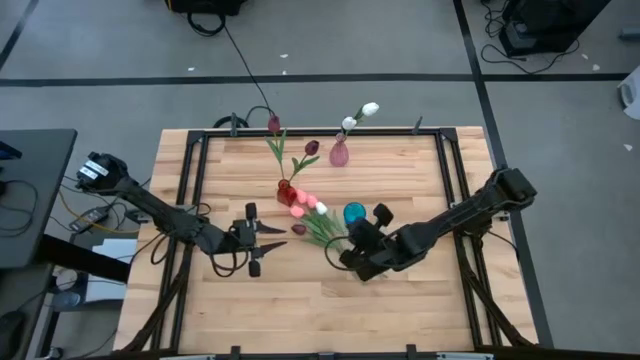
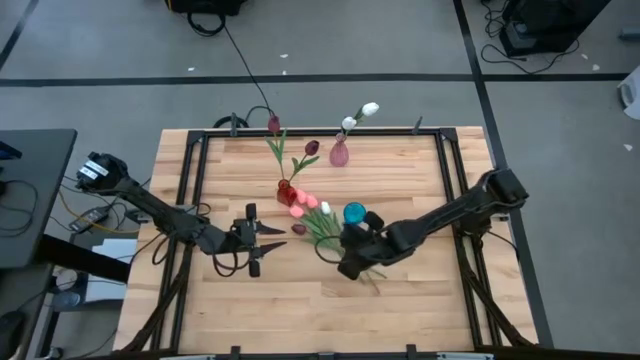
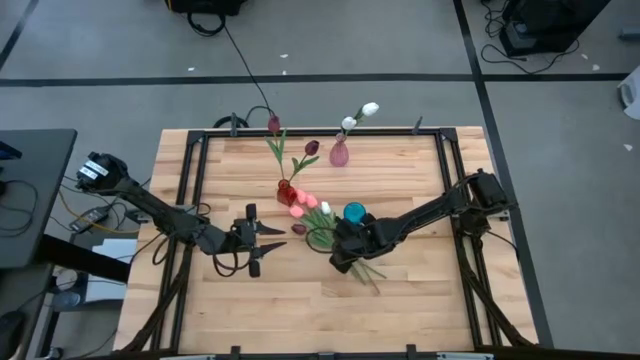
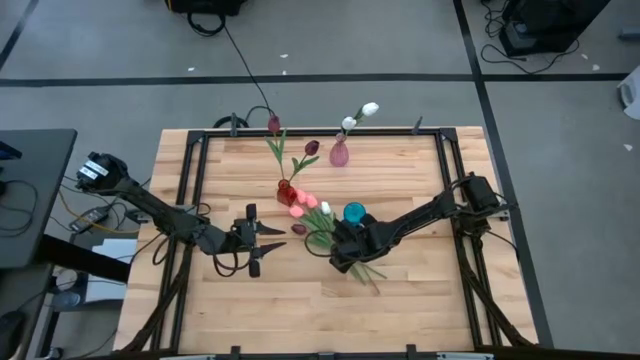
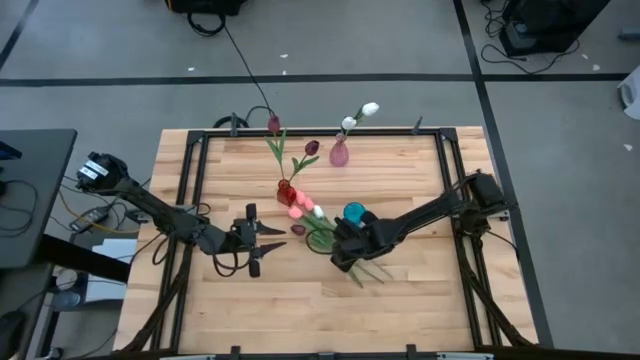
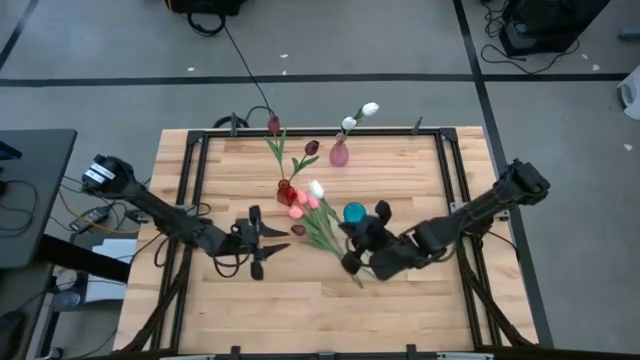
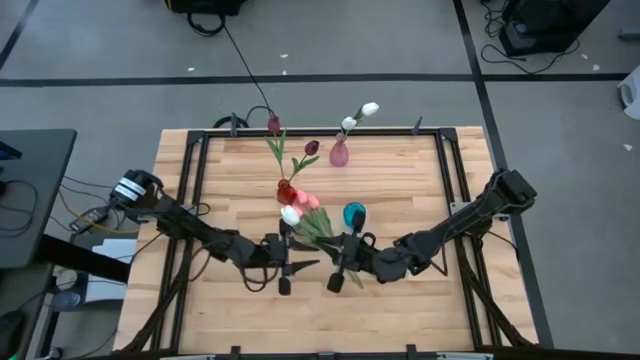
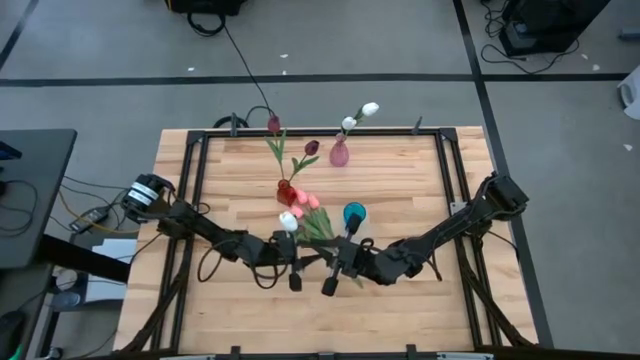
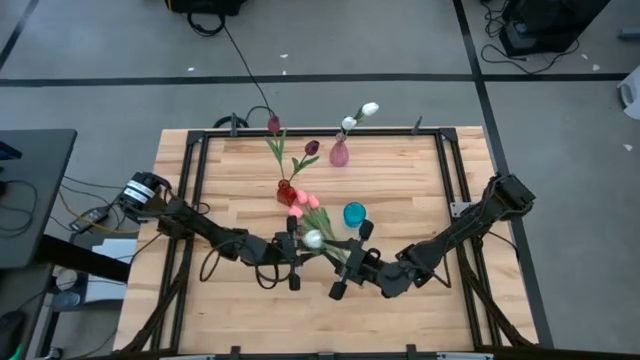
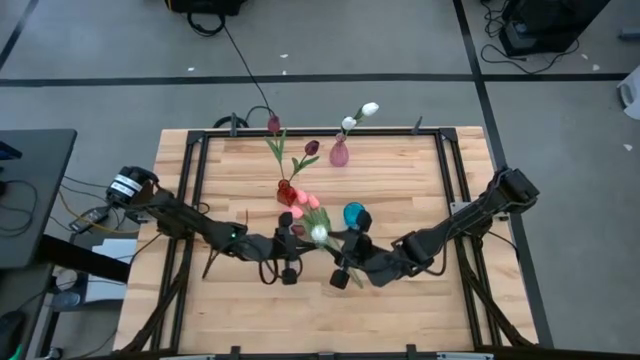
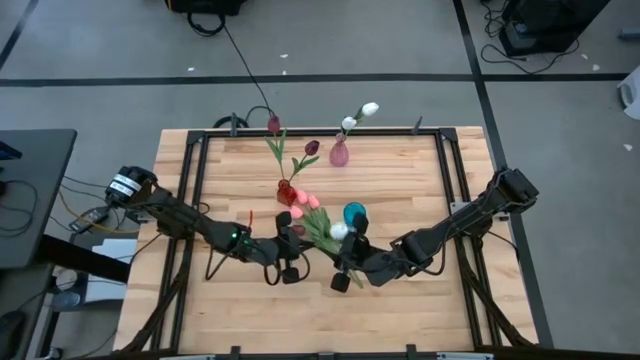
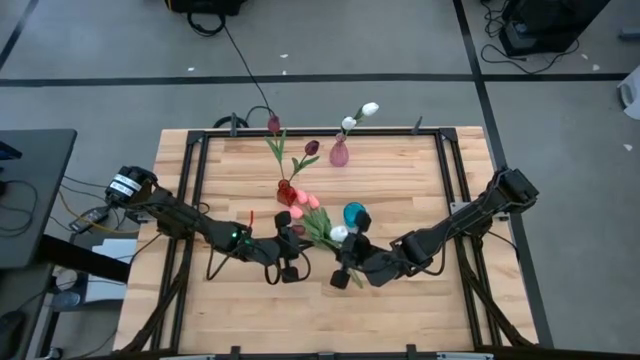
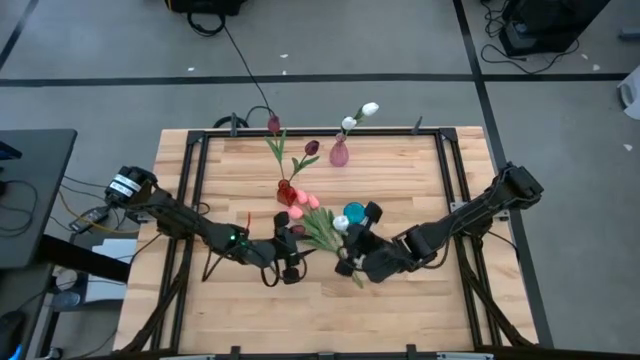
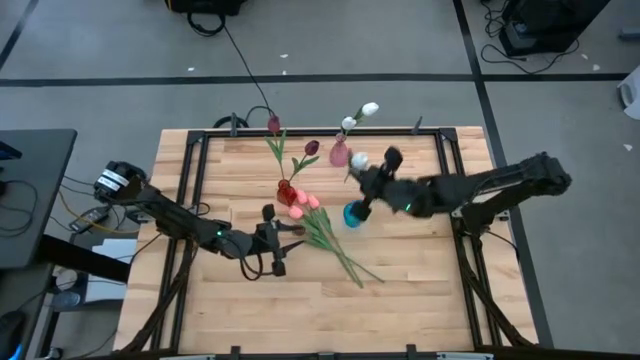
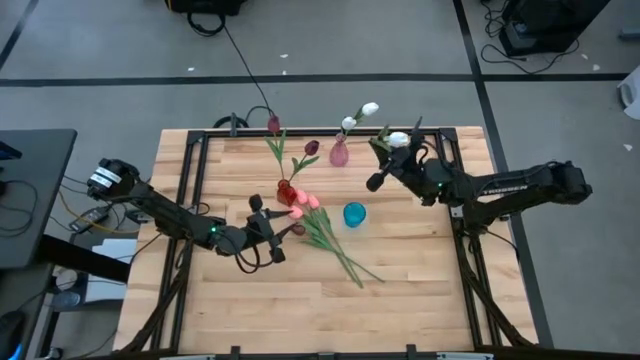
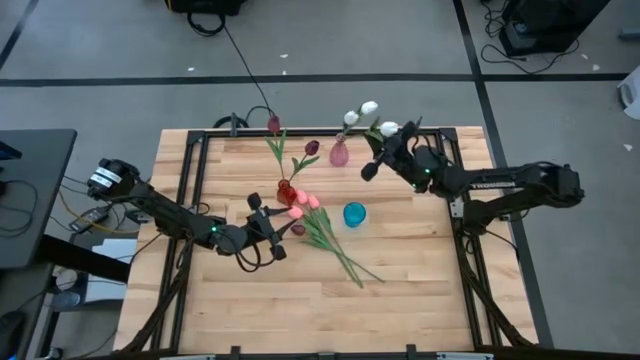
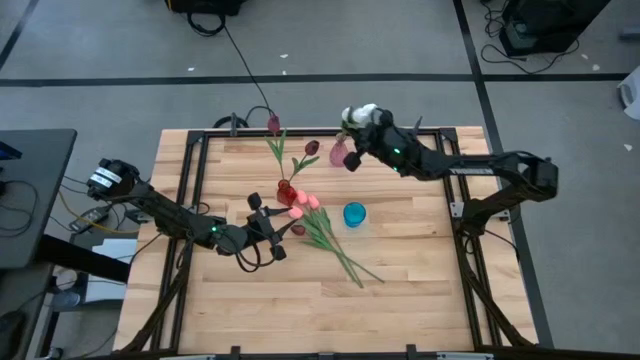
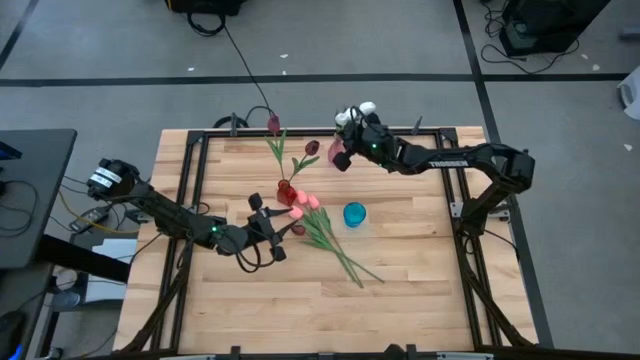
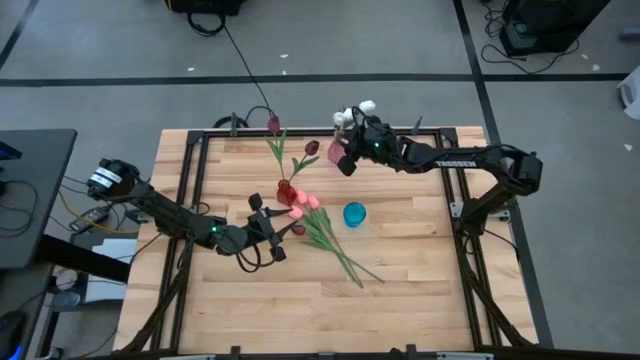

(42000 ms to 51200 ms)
Task: Sort flowers into vase by color
Put the white tulip into the pink vase

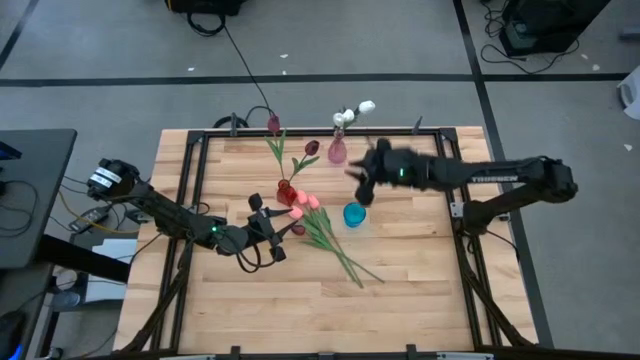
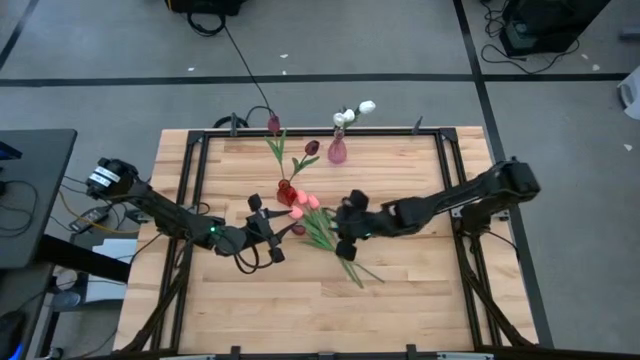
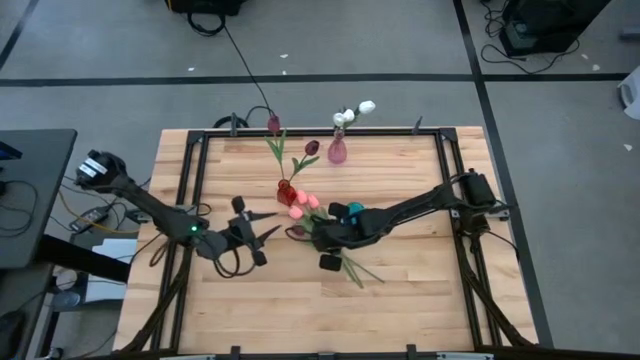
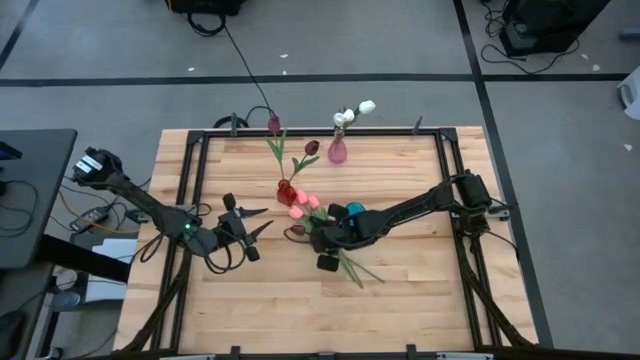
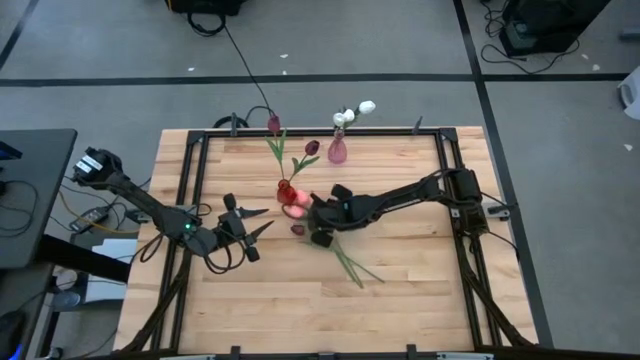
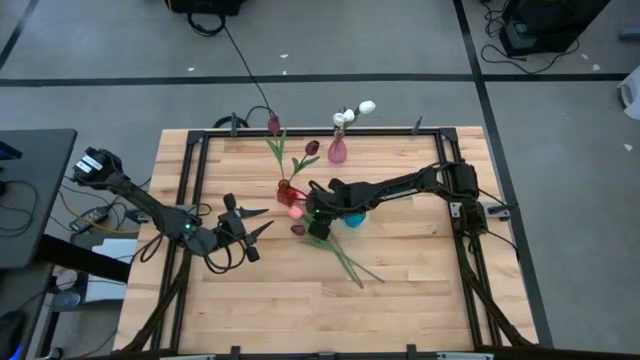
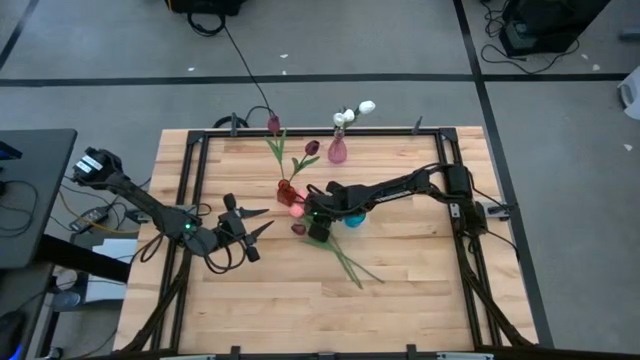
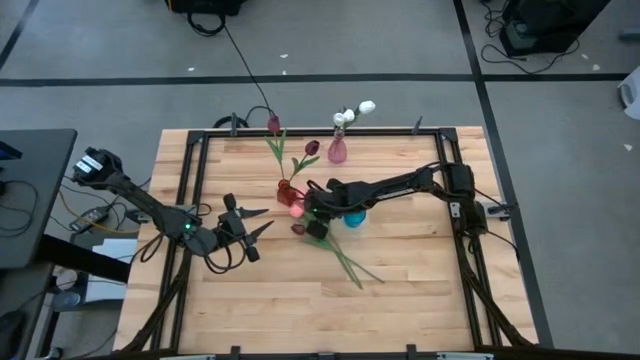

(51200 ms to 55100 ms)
Put the pink tulip into the blue vase

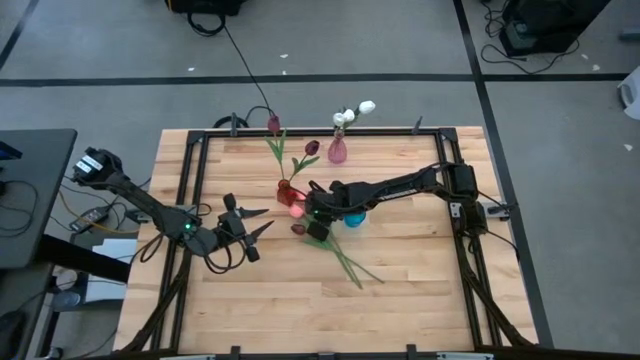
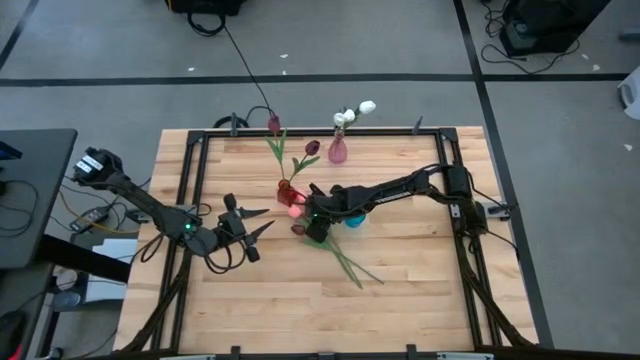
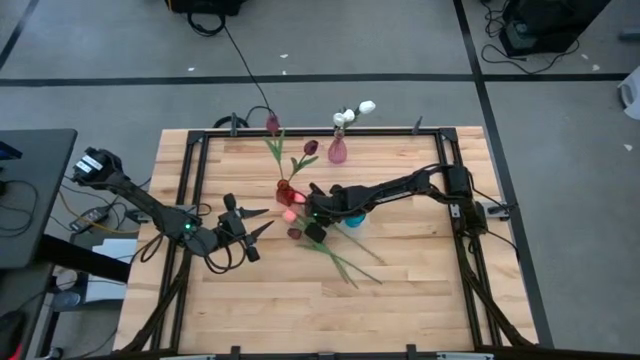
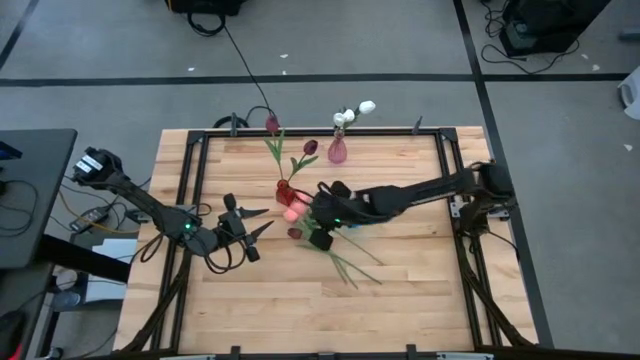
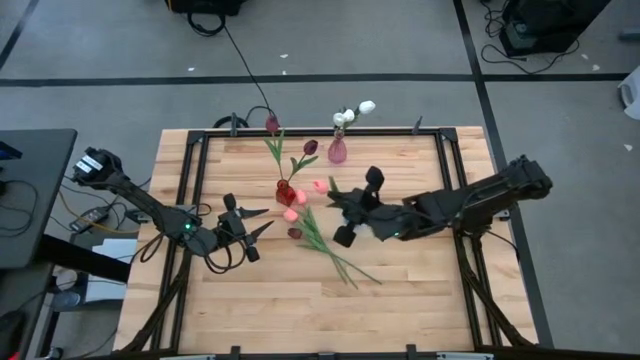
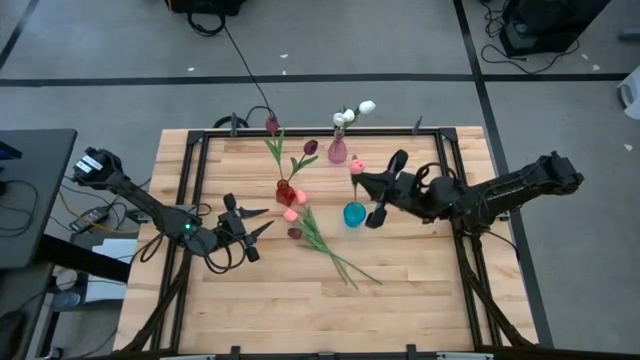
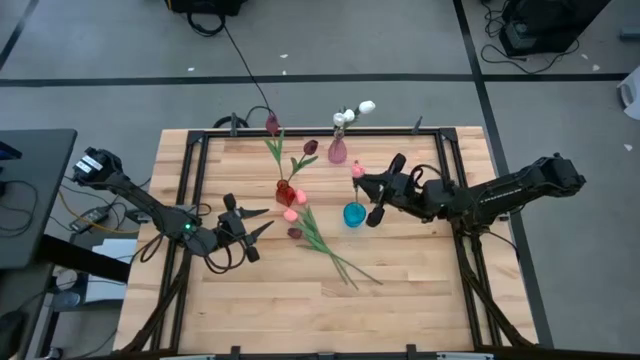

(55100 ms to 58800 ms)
Put the pink tulip into the blue vase

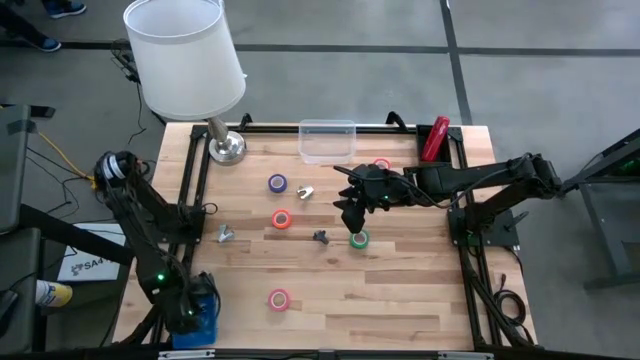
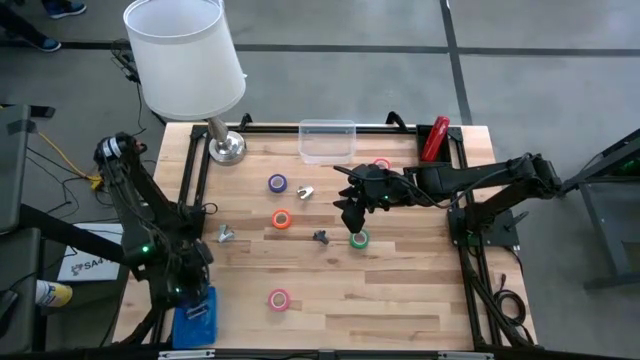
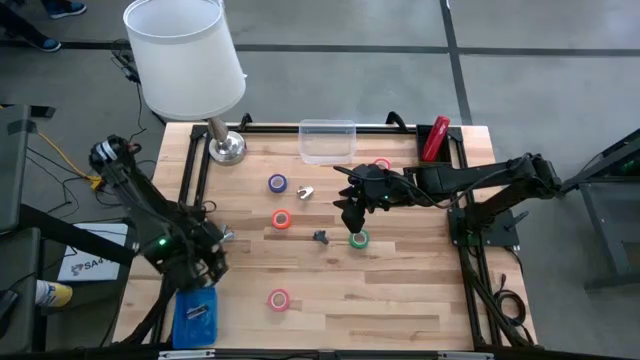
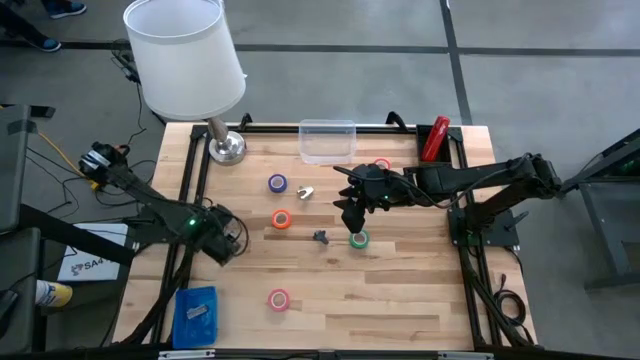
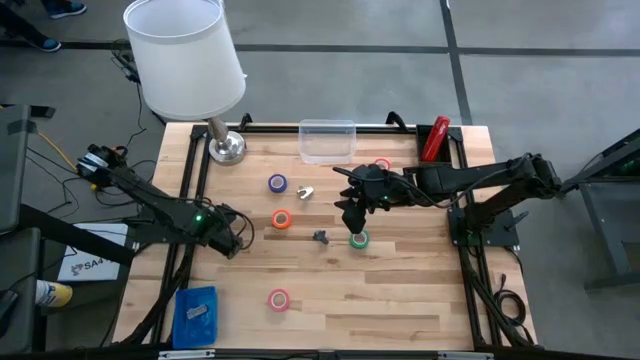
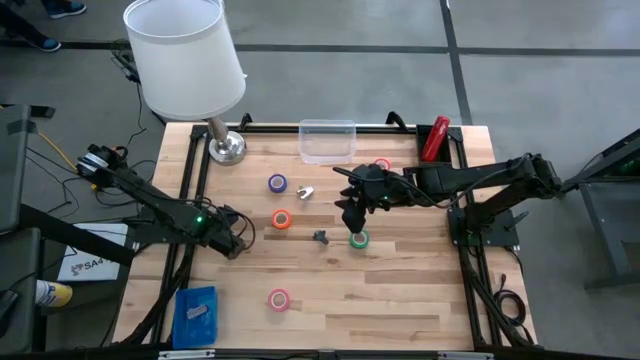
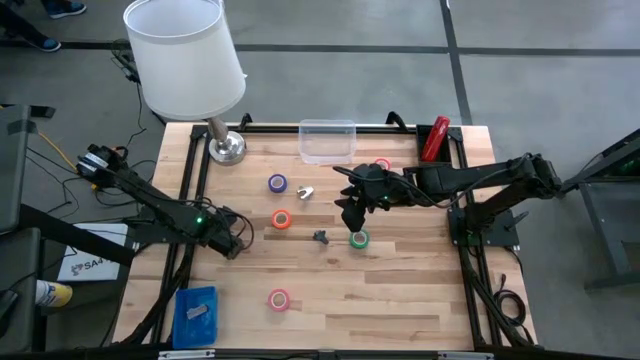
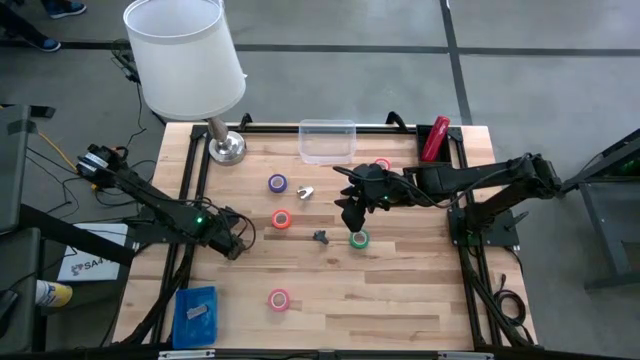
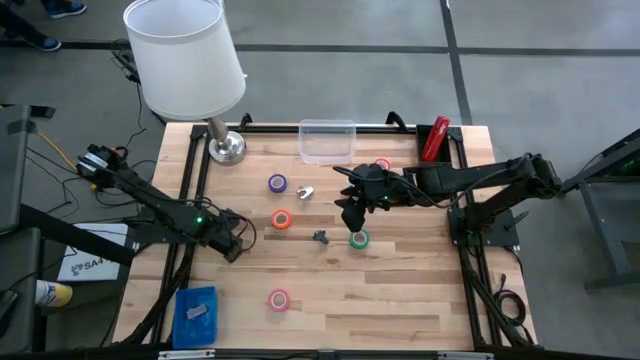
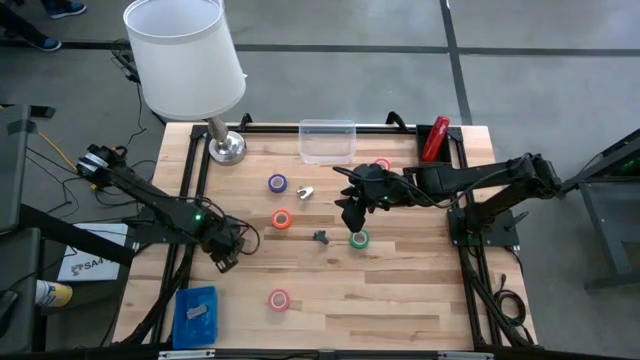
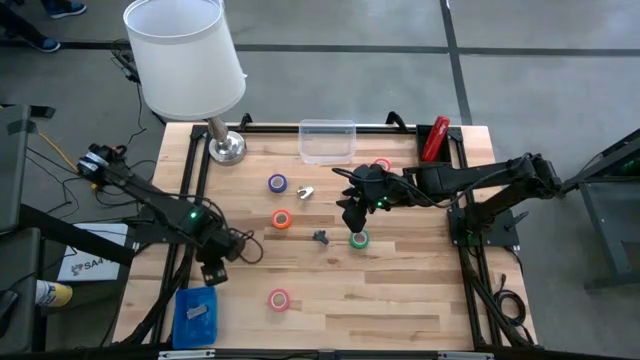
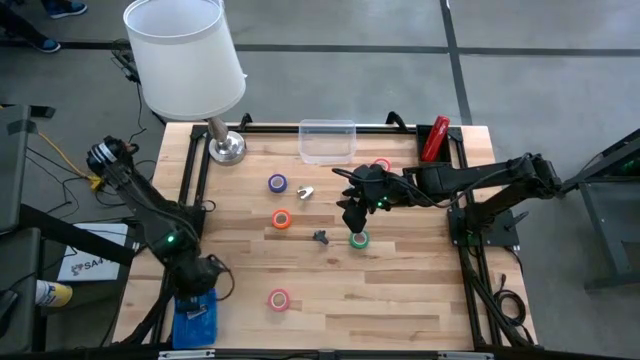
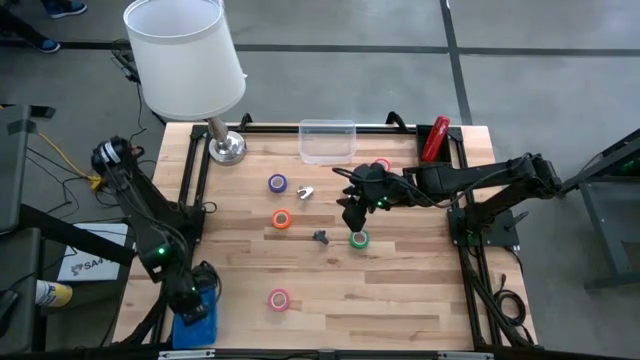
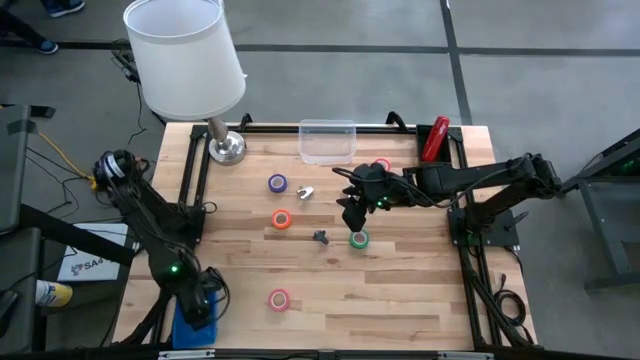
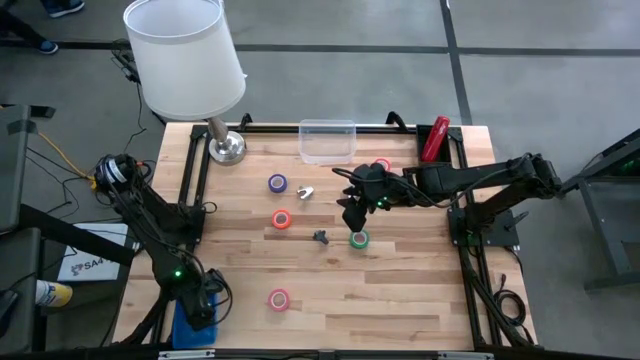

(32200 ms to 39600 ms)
Task: Pick and place Stapler, Stapler remover, tape
Put the light blue staple remover into the blue bin
